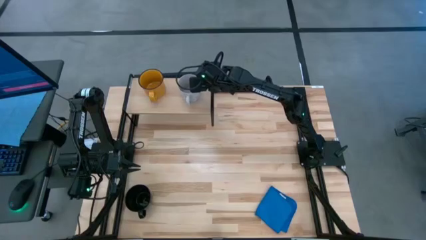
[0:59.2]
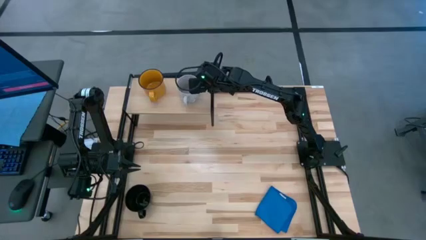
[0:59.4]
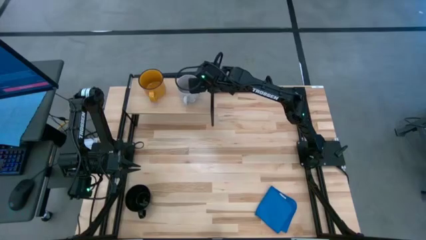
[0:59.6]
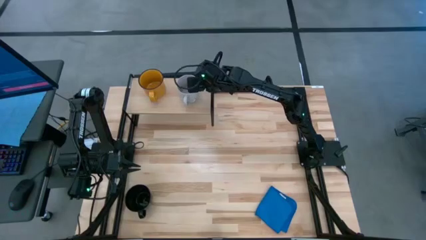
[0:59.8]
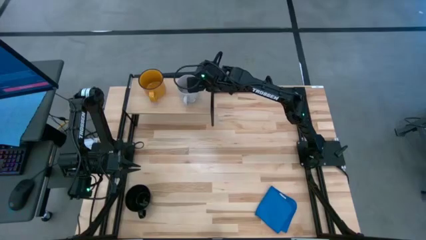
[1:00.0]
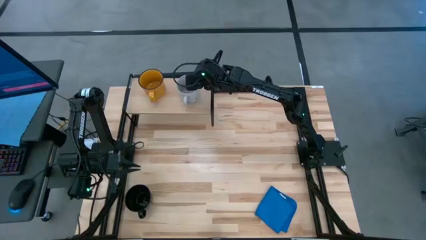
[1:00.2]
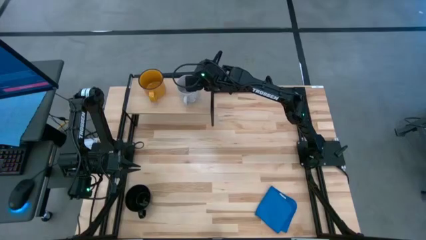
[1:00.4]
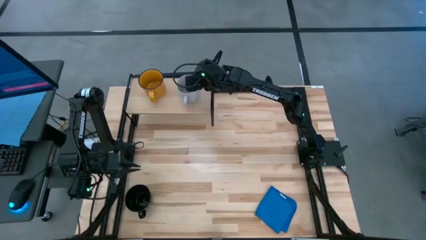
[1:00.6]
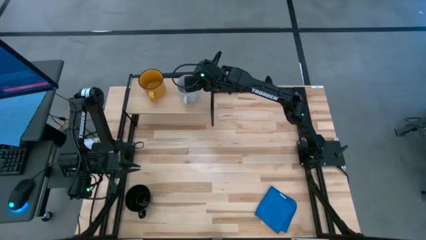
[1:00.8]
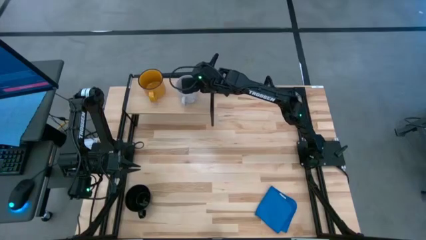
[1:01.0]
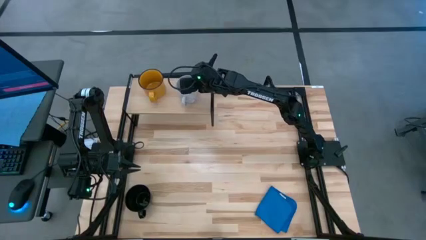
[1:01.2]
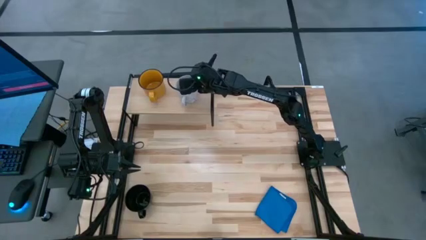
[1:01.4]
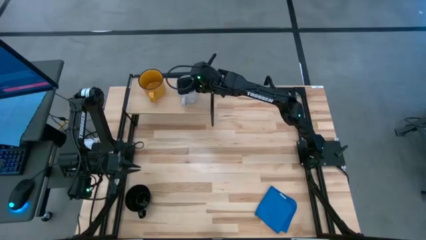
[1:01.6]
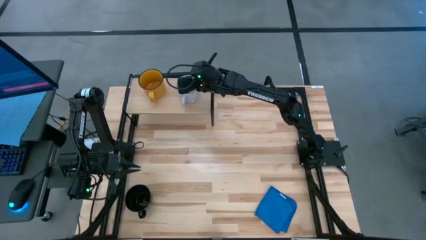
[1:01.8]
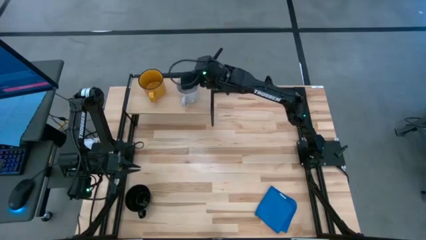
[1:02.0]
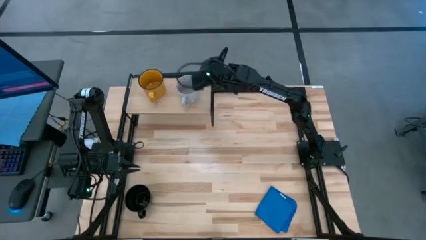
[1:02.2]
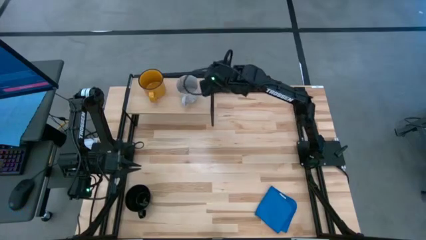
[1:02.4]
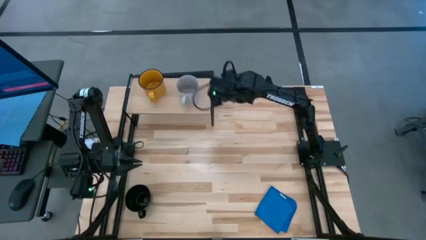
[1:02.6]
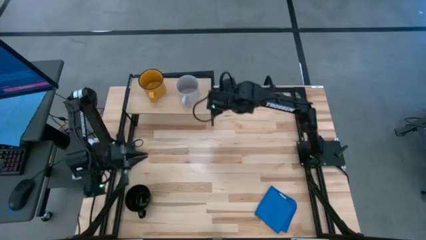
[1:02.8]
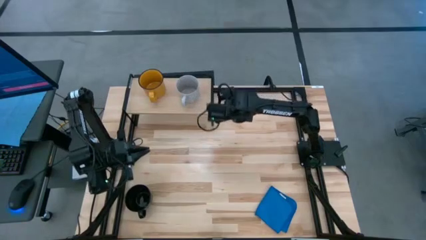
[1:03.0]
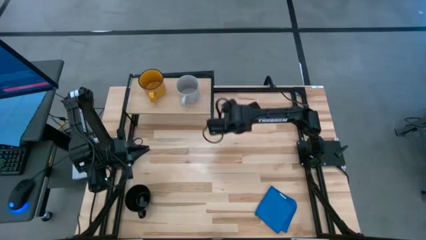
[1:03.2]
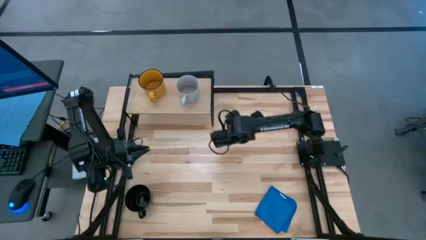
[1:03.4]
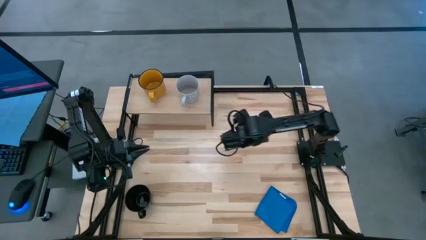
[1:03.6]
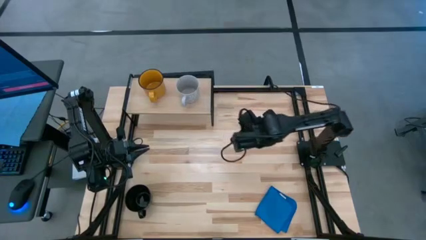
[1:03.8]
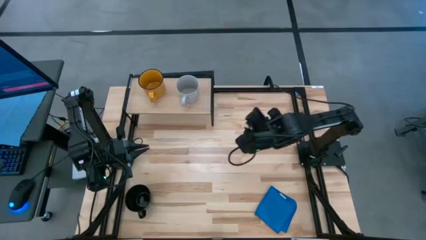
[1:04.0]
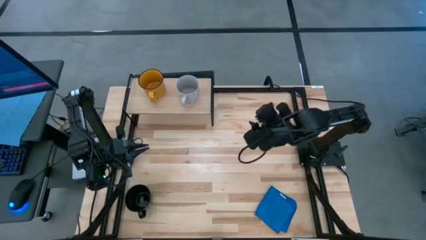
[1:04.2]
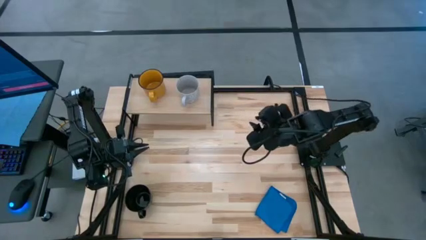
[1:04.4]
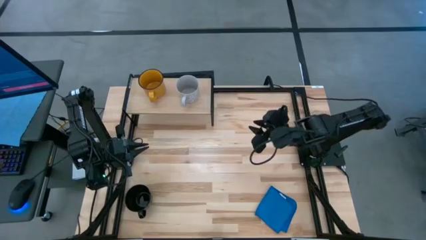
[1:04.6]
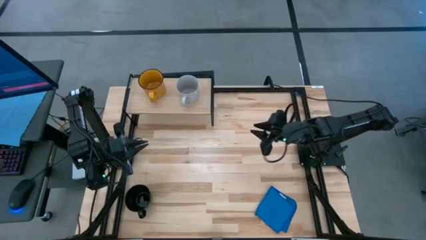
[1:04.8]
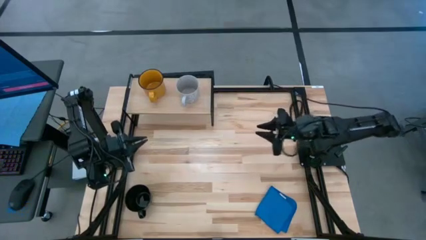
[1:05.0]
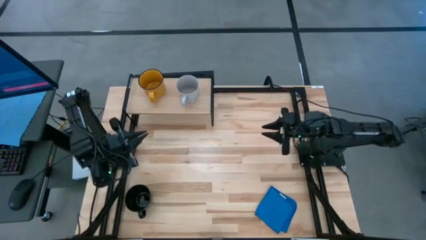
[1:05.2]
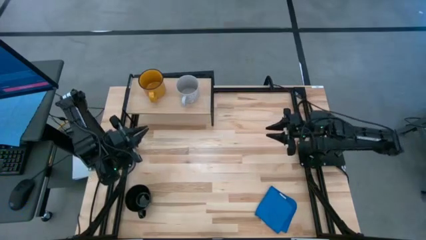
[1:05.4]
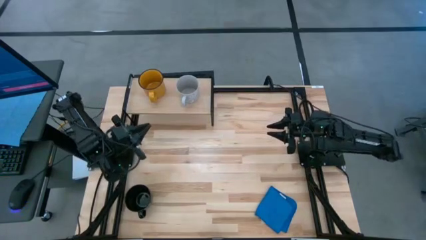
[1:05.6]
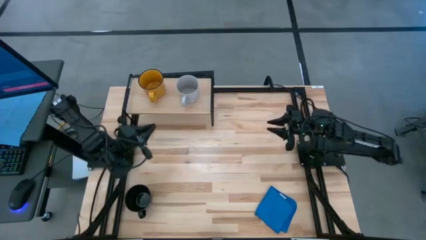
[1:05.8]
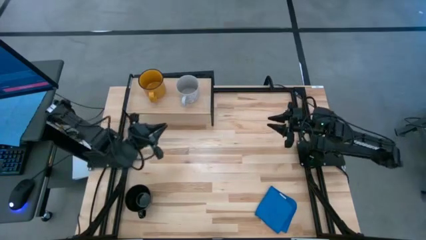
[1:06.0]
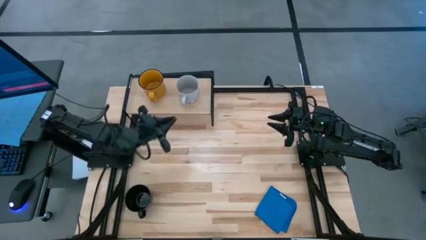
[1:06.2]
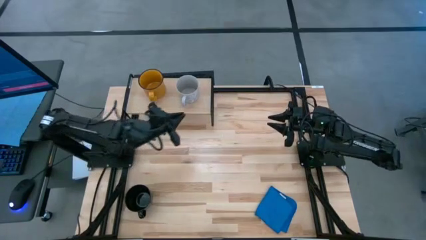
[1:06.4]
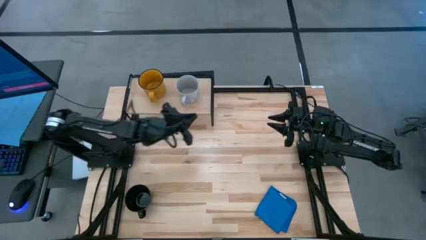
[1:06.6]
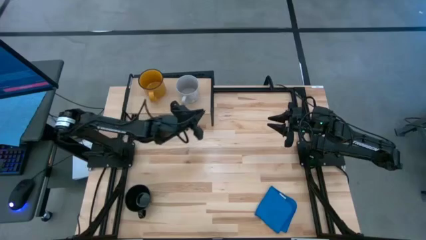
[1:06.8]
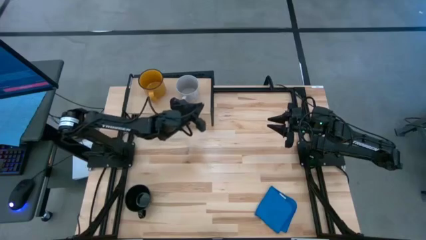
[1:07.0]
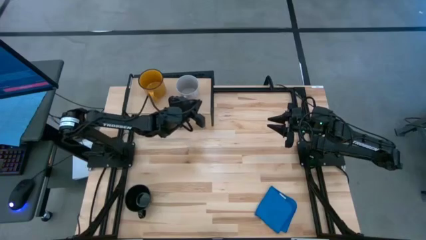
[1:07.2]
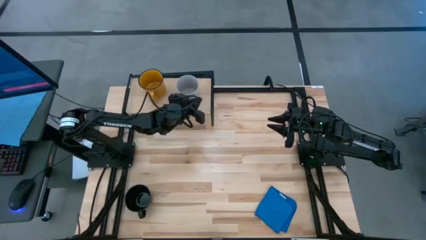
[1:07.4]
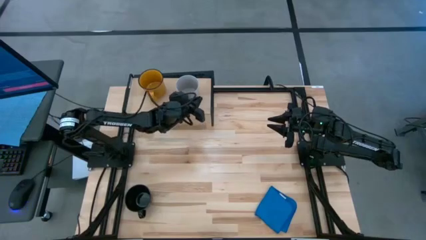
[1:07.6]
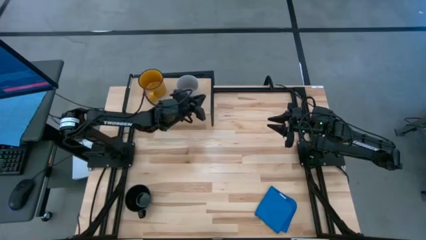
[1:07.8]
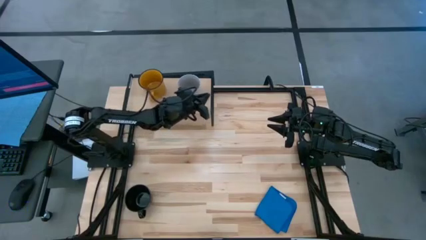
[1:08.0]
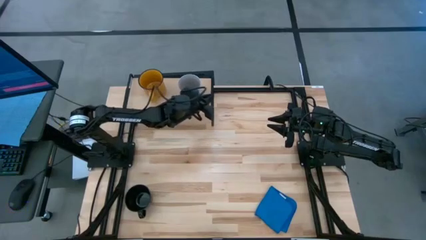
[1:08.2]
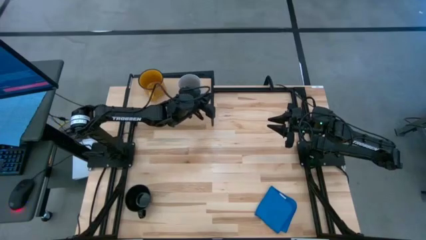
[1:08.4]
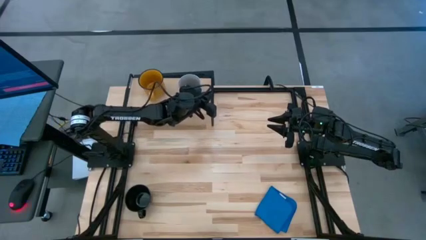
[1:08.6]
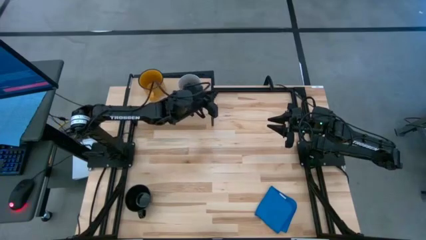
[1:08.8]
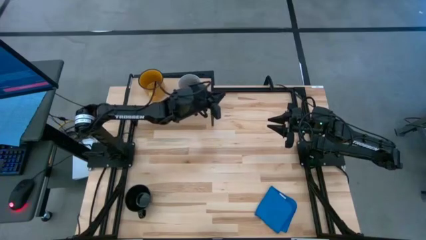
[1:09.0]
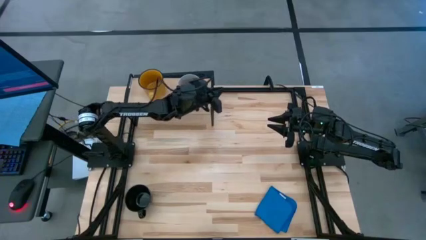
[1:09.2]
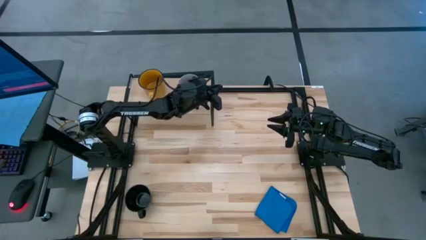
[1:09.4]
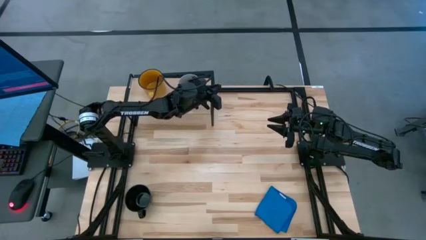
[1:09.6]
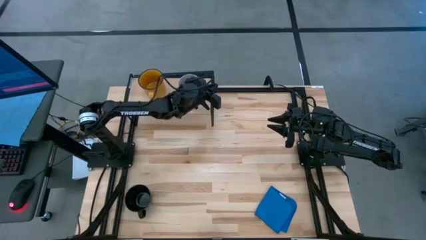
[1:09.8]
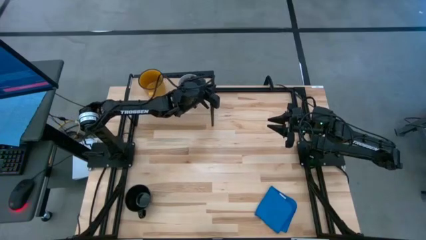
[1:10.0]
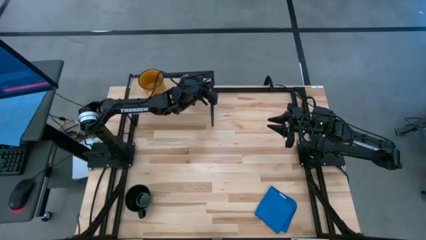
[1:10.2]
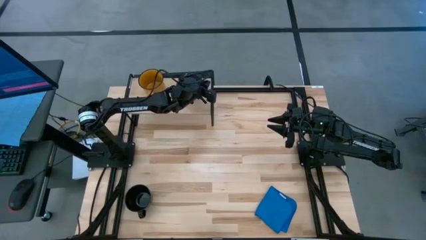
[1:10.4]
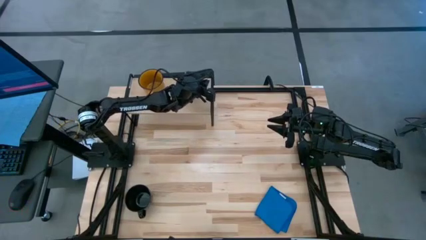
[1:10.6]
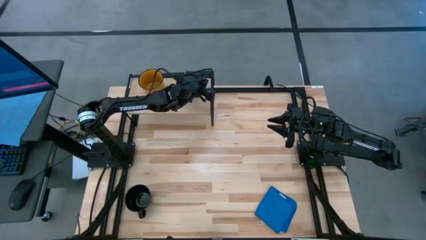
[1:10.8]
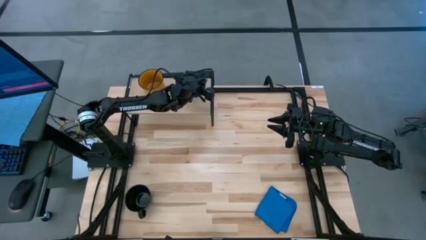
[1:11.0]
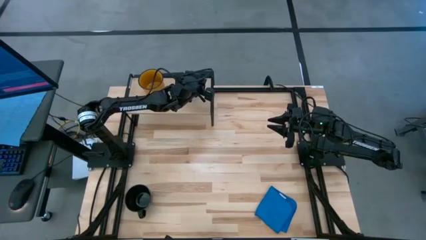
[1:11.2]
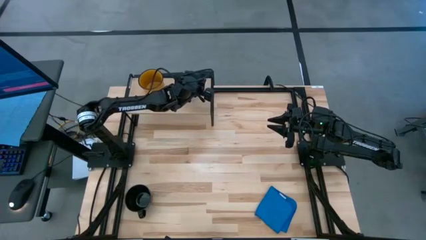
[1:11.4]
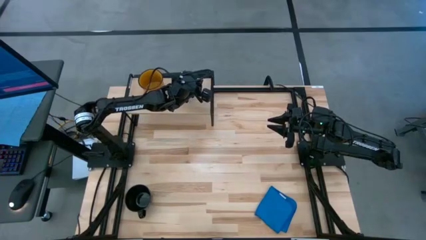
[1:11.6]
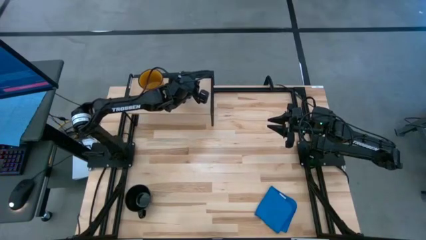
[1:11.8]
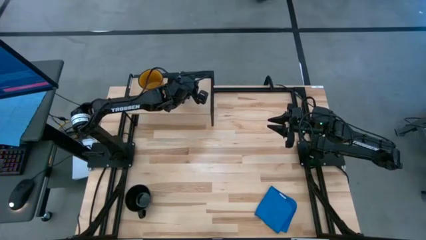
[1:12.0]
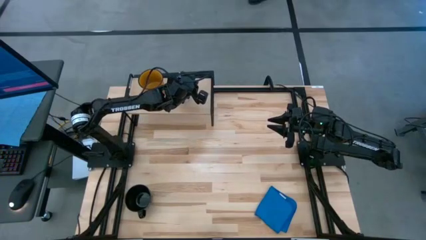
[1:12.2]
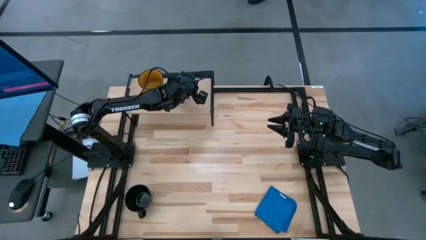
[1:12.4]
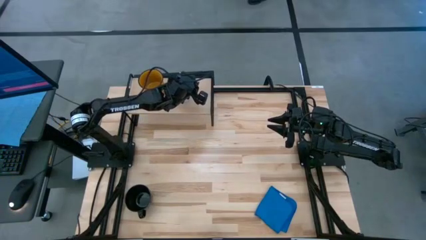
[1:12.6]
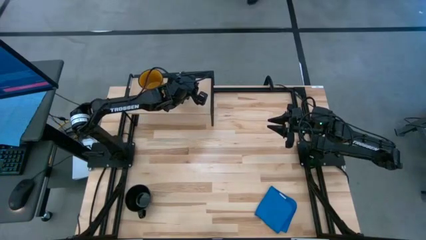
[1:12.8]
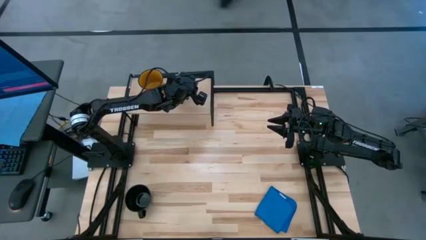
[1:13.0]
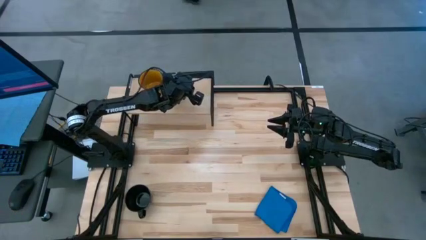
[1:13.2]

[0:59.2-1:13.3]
Task: Stack small to large cups/mugs on shelf
Put the gray mug on the shelf
